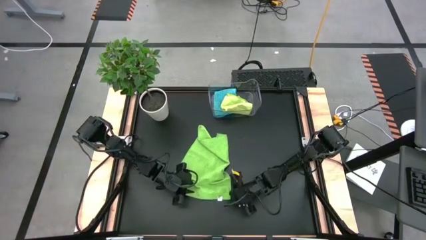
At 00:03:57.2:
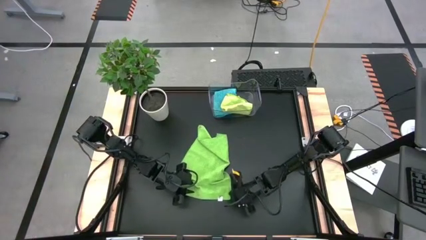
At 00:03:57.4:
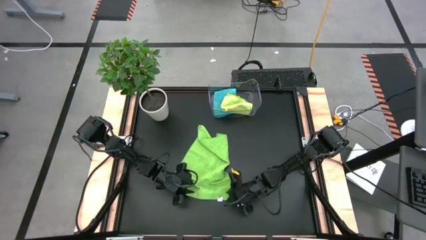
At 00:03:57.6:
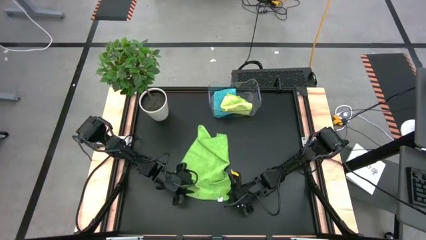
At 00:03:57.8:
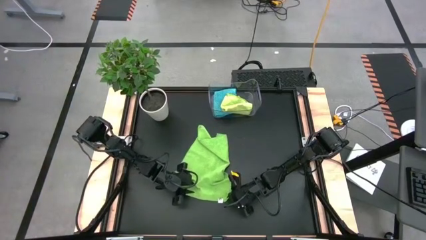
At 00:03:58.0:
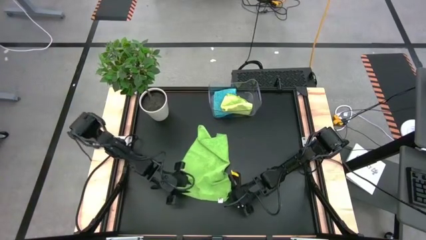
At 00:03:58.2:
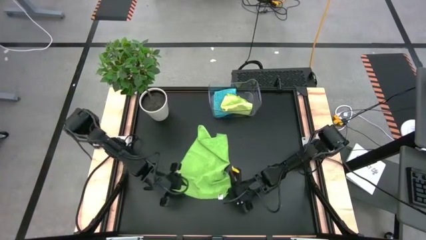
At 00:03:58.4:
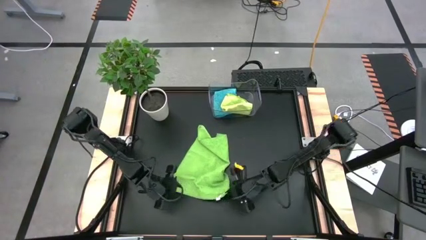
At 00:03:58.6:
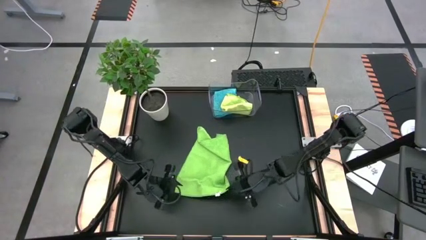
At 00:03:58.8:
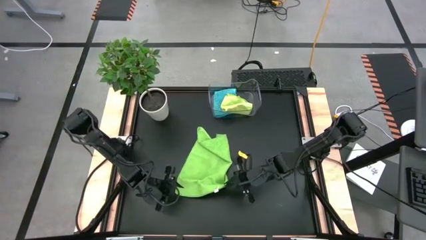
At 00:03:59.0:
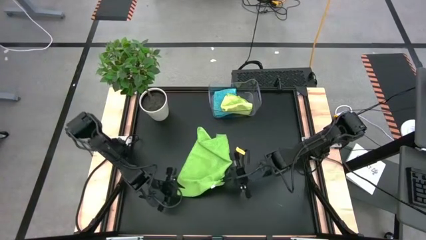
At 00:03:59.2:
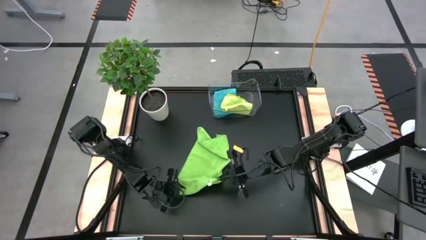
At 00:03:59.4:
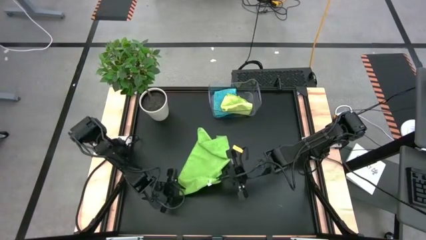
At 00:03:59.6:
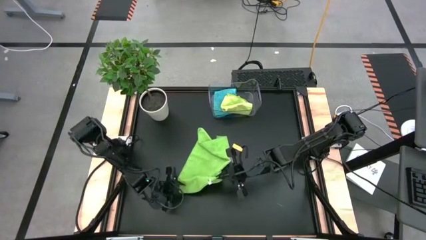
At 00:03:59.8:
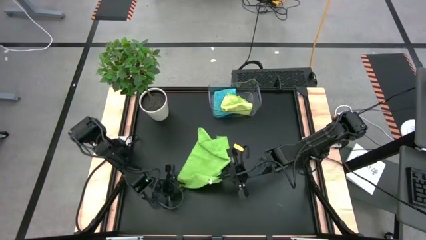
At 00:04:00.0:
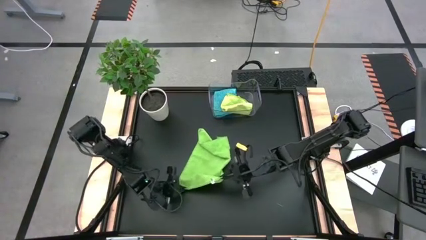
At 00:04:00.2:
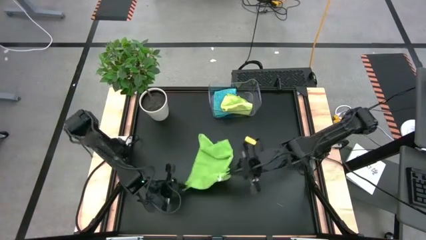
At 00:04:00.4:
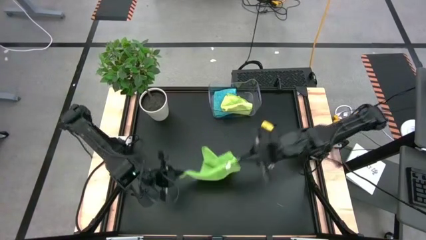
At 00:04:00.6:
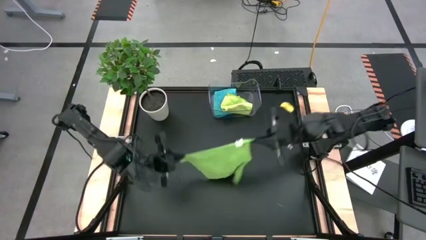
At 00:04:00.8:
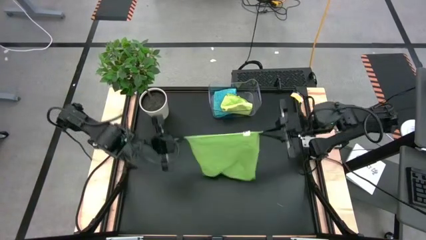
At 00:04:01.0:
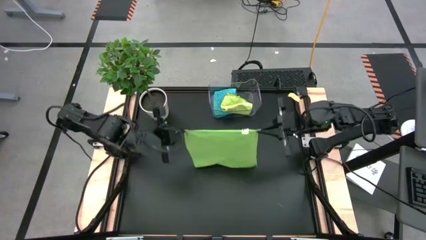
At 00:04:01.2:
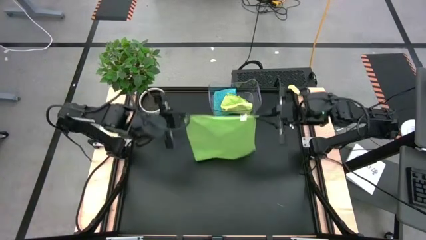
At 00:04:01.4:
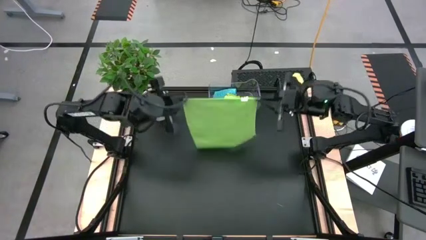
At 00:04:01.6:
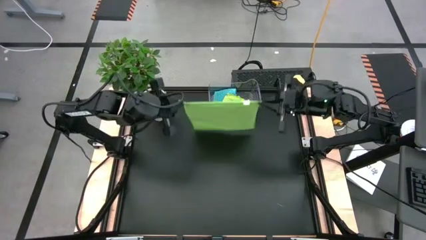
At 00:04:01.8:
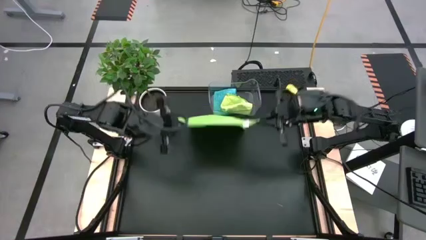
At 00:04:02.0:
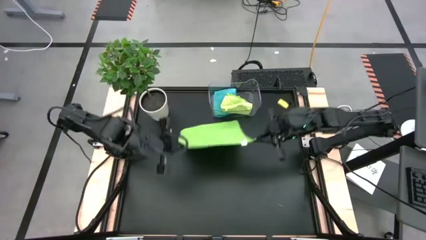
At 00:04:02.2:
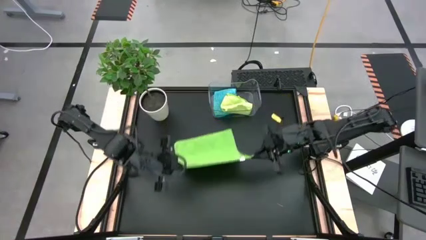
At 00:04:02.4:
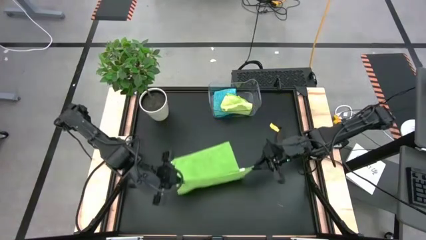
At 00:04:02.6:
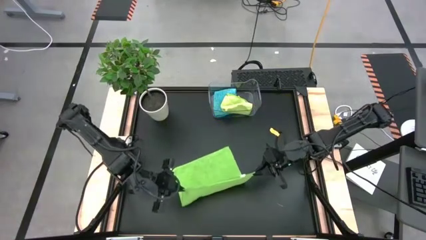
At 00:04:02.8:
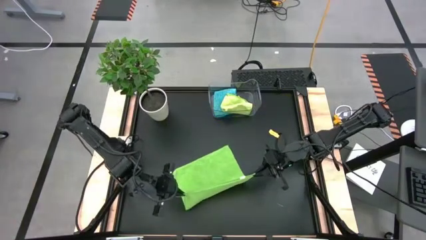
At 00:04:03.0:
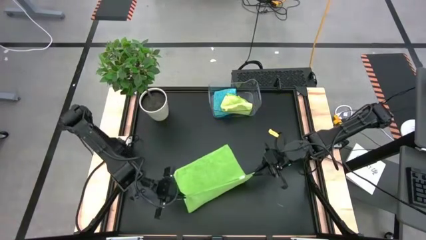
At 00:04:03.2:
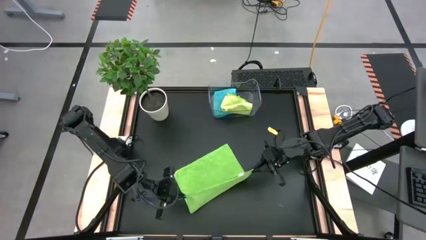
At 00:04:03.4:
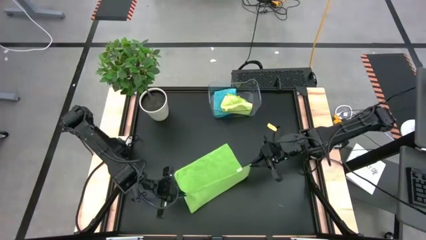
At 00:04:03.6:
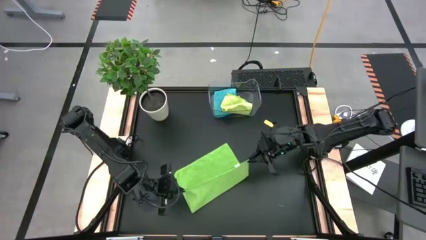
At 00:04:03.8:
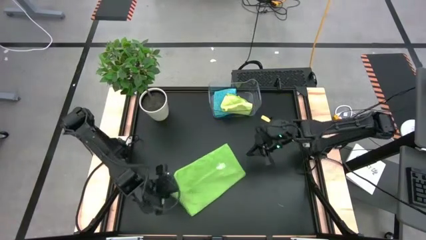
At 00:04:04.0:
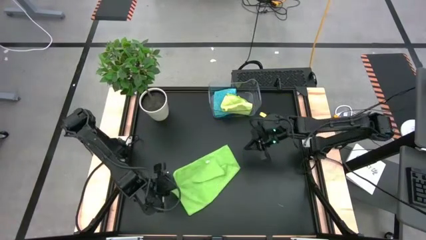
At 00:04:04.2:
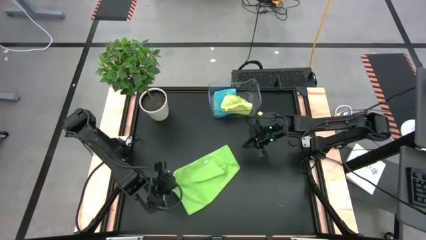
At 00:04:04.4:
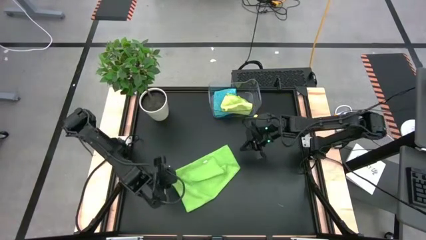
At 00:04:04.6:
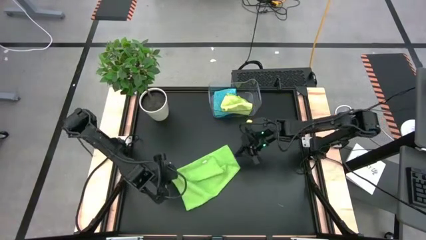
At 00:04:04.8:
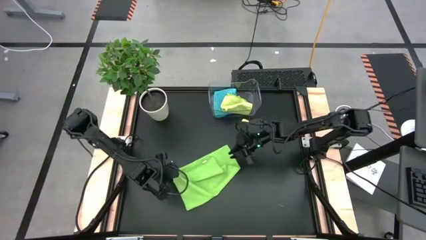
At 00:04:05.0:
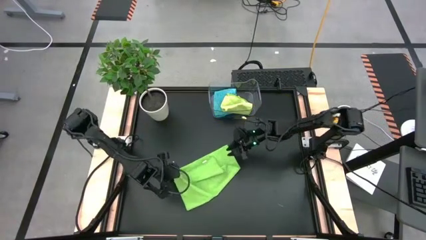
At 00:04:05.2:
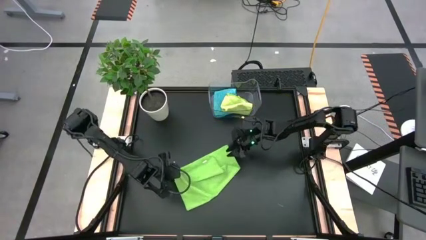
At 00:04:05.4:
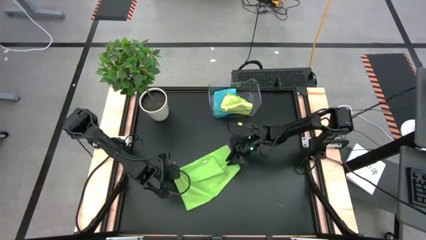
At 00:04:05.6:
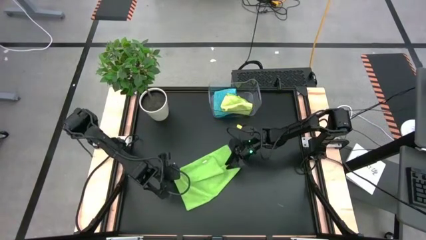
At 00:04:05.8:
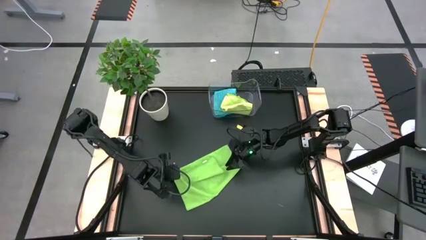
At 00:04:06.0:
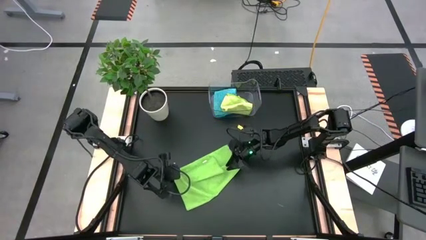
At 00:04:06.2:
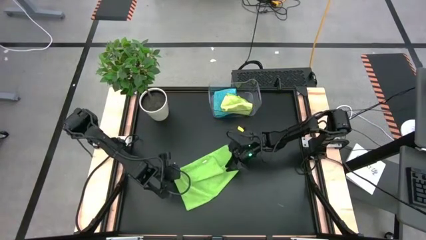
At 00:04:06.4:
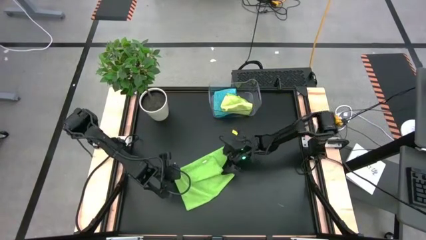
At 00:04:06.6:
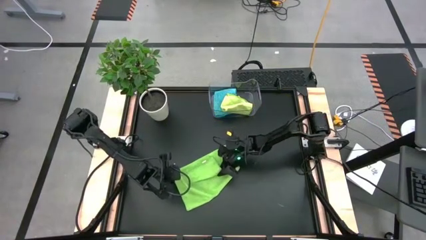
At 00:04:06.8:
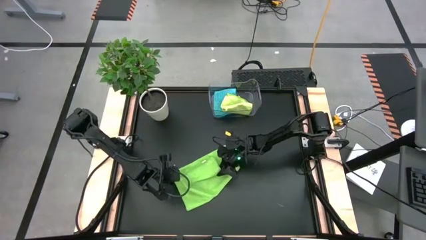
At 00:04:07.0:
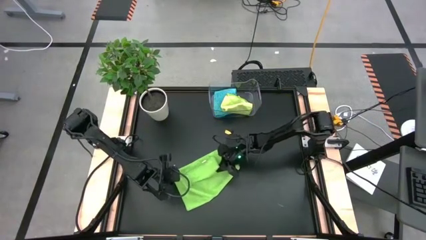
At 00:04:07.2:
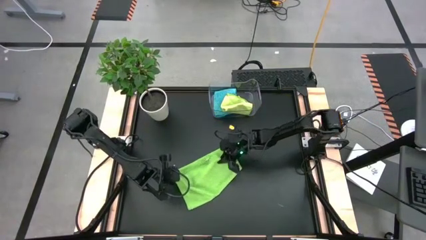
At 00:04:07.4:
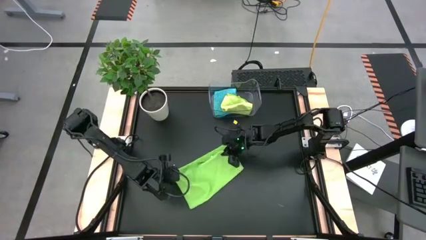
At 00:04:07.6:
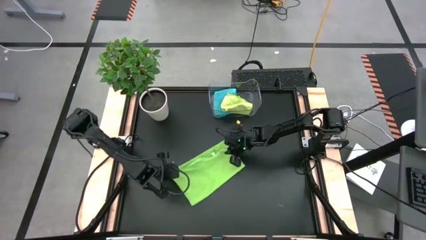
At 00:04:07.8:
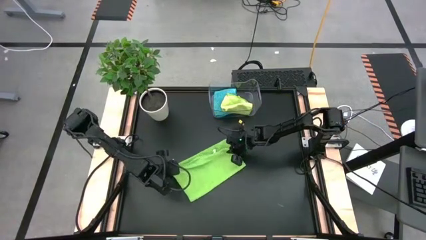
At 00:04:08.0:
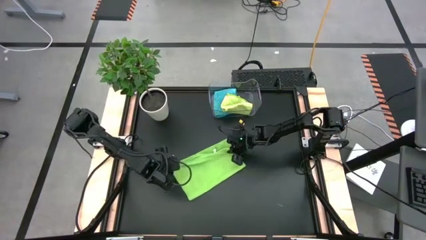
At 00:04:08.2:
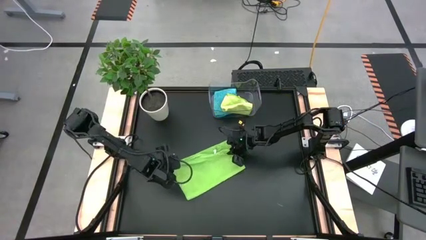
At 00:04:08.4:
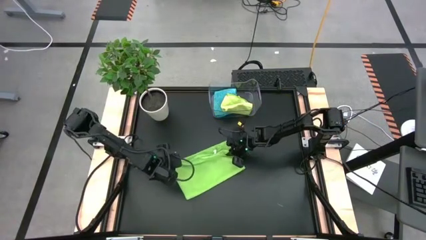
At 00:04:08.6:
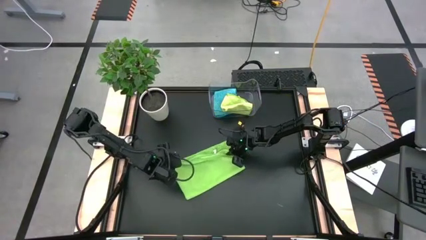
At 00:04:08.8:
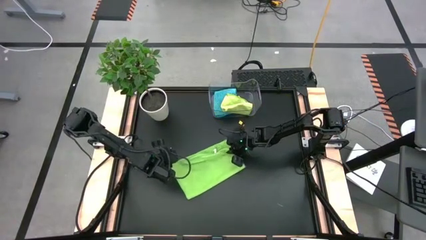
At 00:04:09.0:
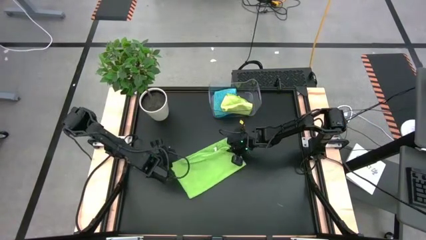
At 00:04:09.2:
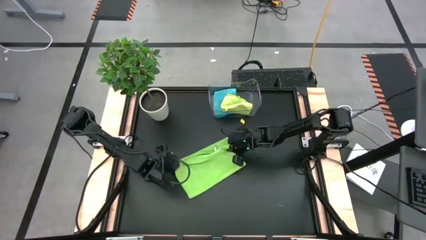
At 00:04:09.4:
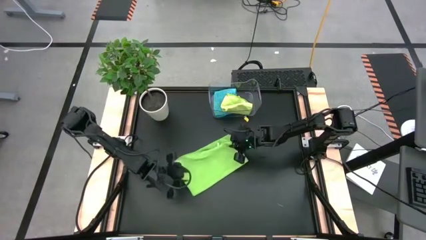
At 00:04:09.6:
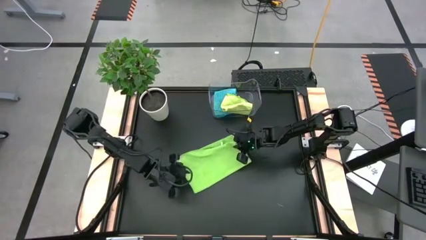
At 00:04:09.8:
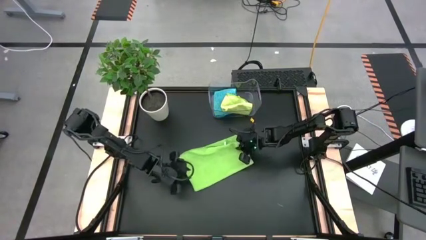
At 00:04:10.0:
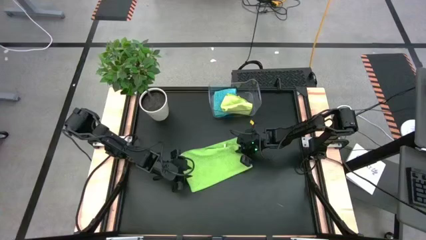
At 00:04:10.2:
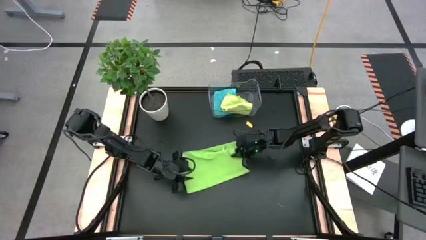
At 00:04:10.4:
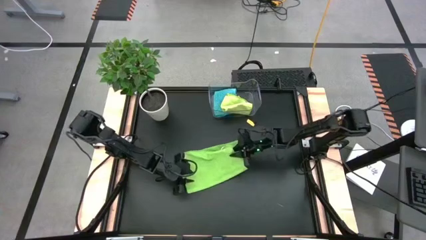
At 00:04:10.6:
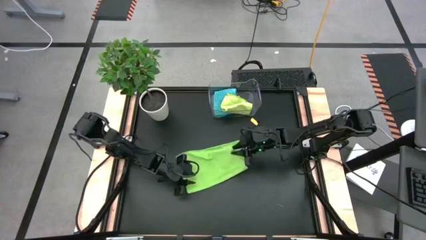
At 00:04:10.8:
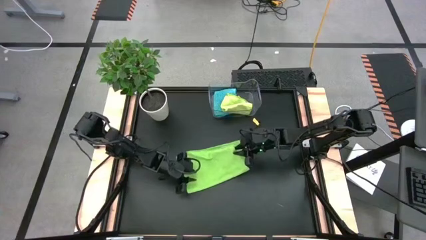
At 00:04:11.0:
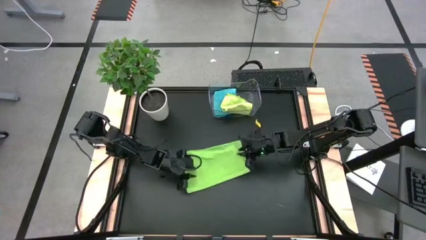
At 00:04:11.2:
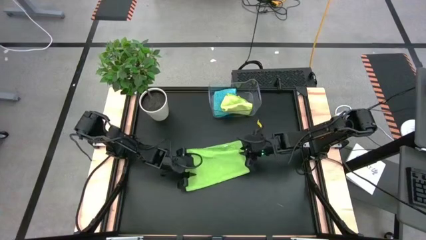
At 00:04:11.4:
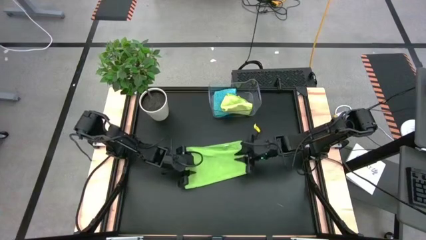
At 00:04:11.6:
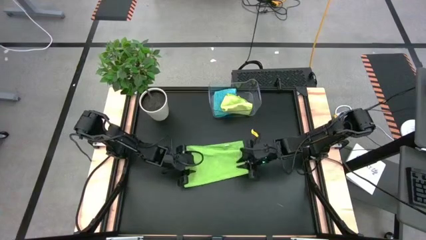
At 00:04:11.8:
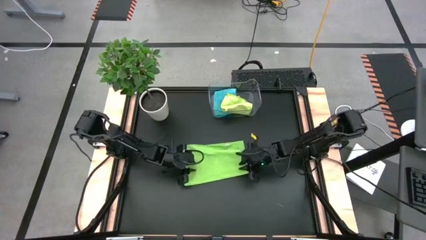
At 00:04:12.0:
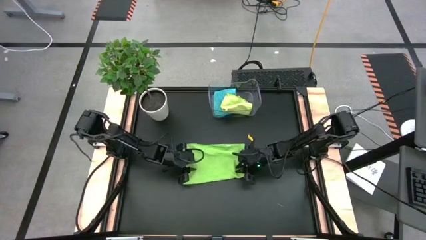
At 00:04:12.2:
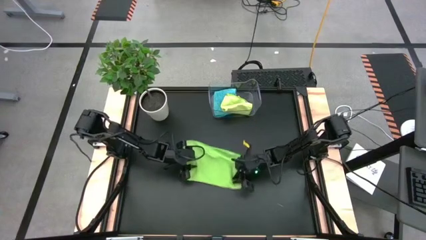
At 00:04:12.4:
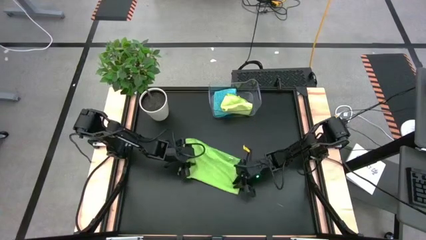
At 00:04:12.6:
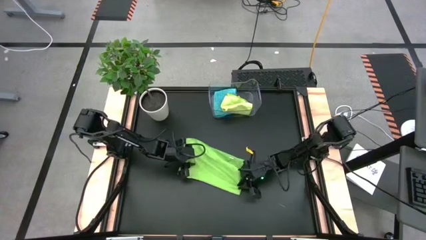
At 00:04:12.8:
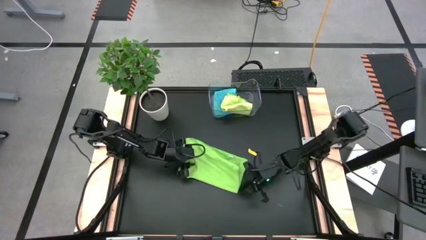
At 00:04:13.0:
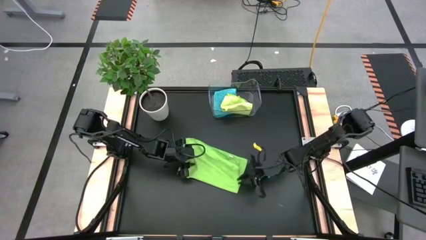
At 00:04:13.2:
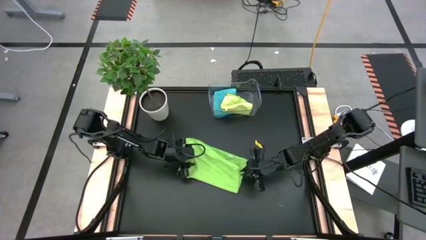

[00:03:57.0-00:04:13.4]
Task: Fold microfiber towels
Fold the green microfiber cloth
